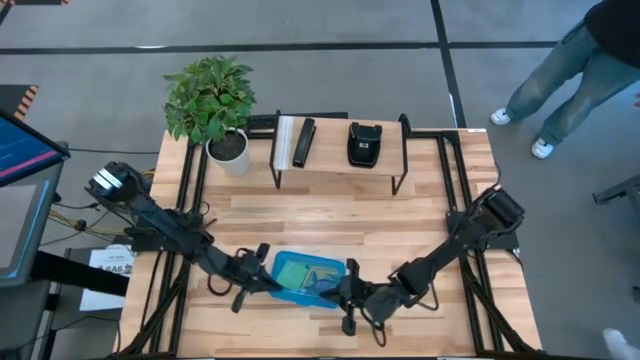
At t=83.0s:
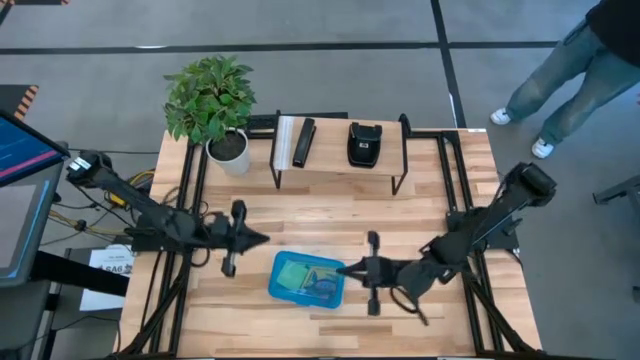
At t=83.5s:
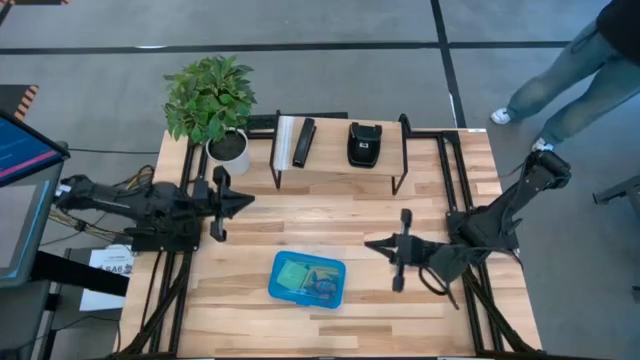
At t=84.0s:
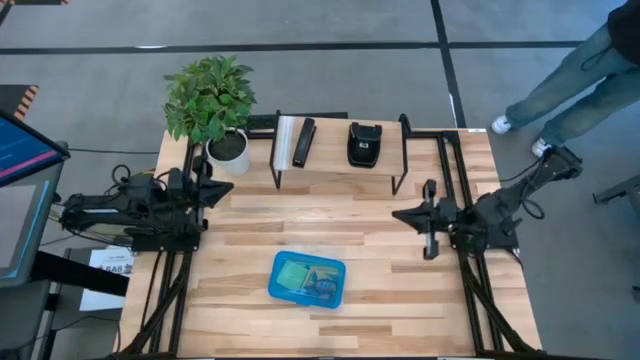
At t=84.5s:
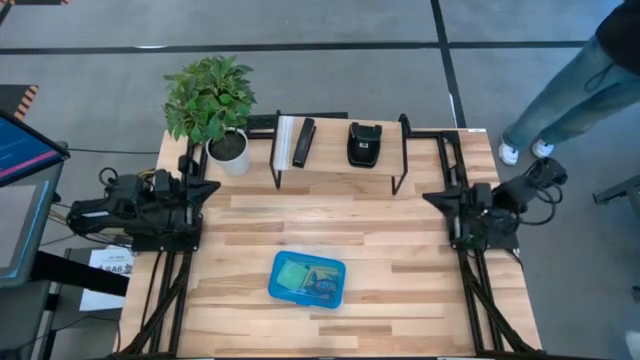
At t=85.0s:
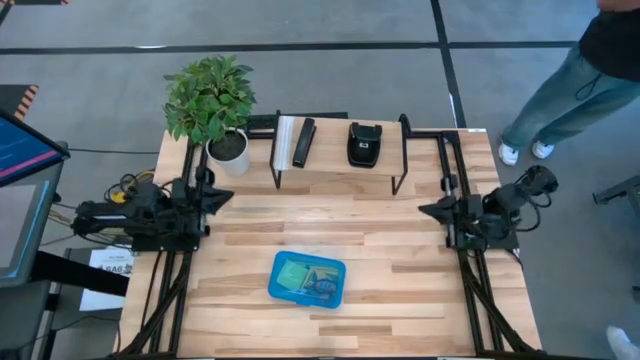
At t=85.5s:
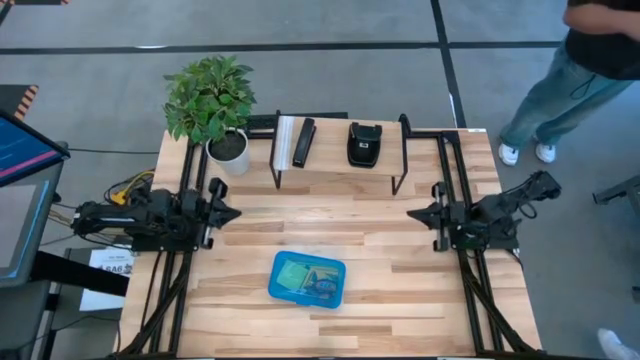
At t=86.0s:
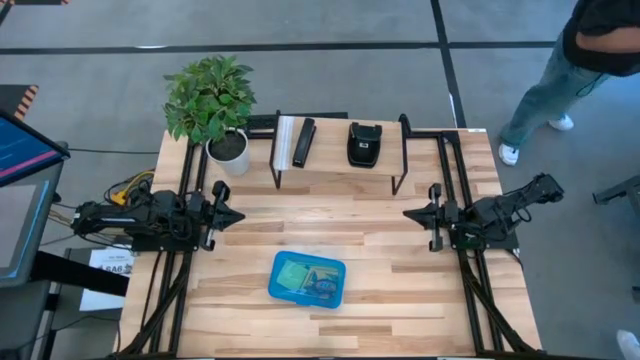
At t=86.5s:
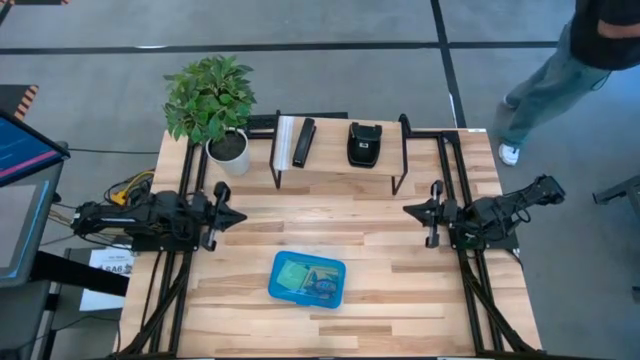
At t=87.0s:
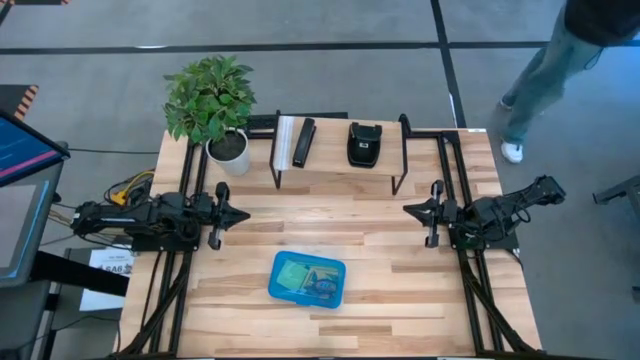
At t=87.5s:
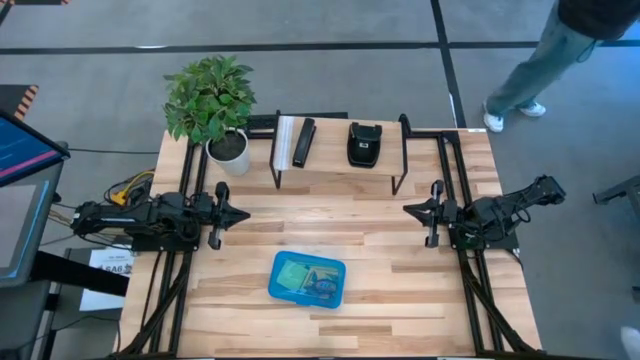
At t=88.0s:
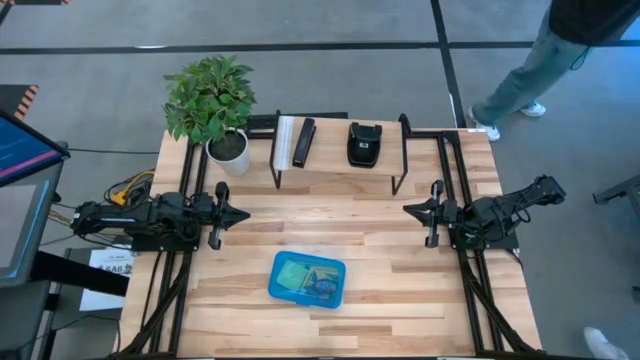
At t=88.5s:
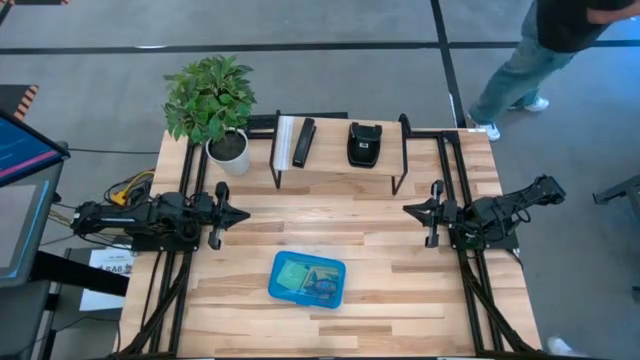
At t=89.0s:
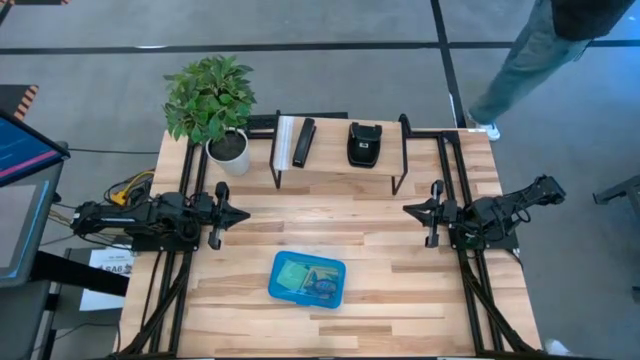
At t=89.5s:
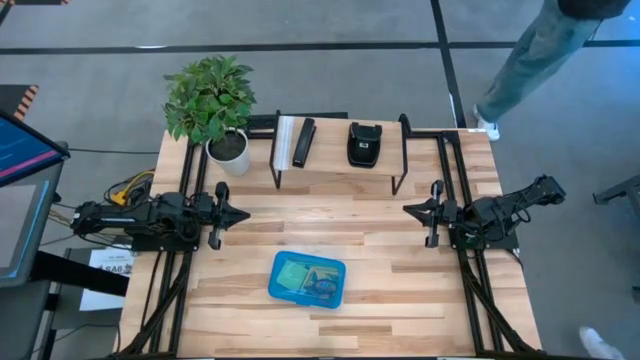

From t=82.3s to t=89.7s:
Task: Pack school essentials
Return to Home Position

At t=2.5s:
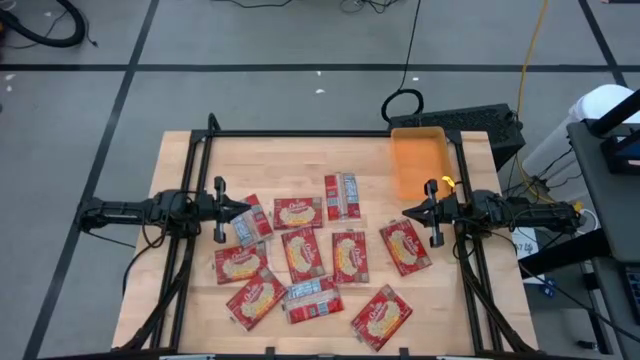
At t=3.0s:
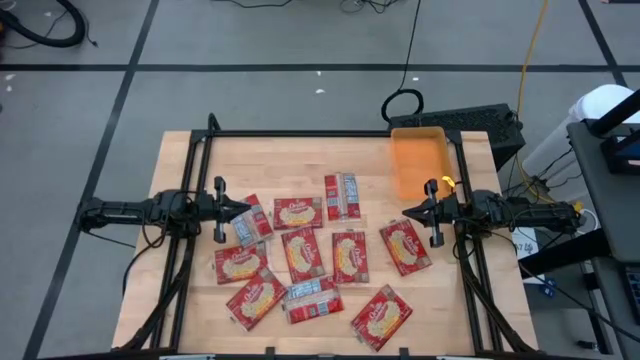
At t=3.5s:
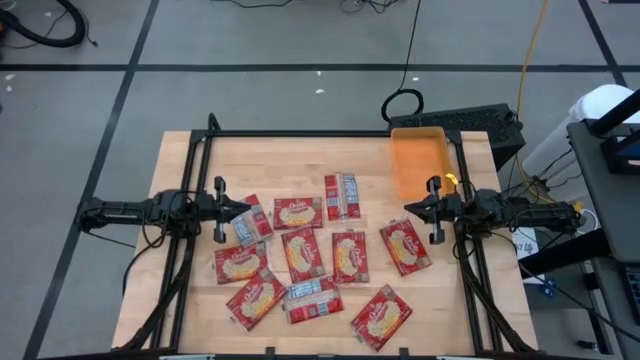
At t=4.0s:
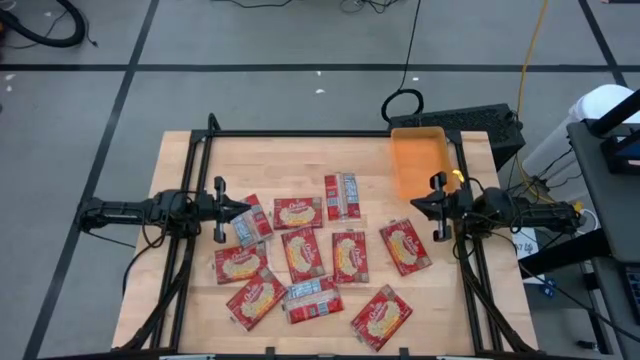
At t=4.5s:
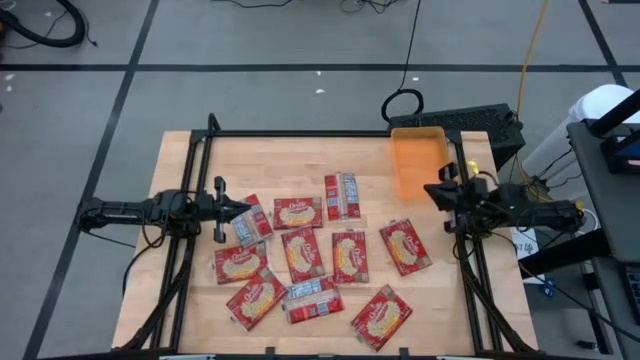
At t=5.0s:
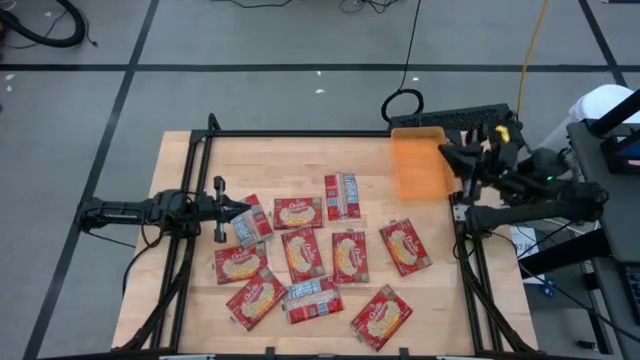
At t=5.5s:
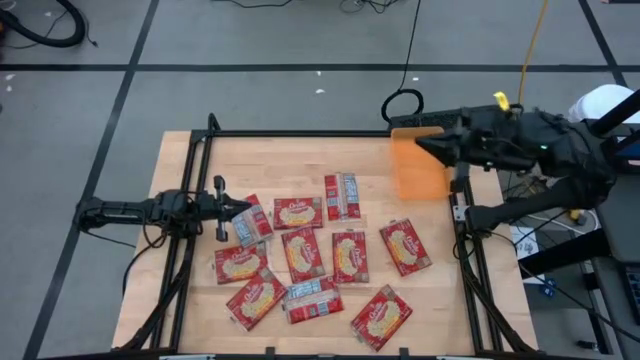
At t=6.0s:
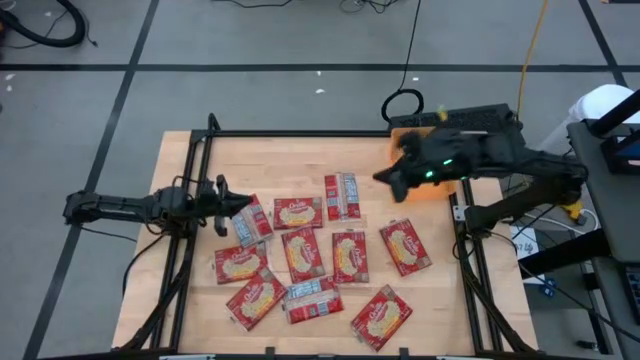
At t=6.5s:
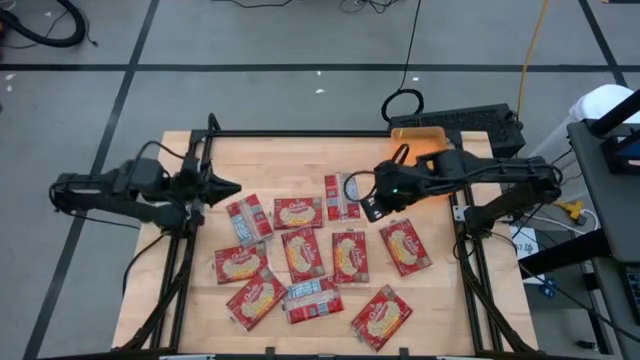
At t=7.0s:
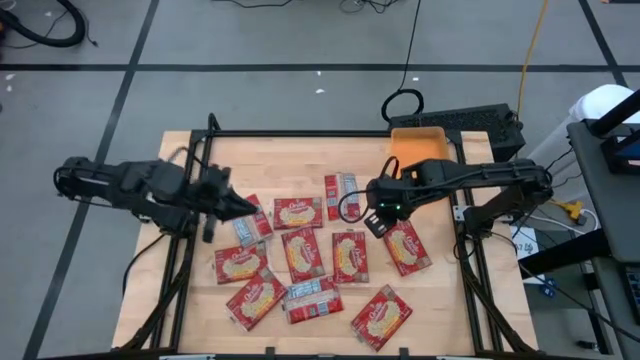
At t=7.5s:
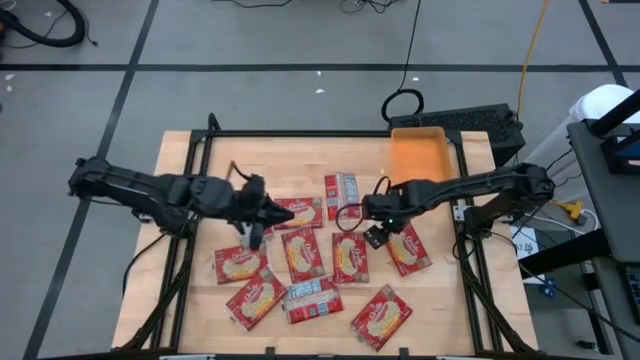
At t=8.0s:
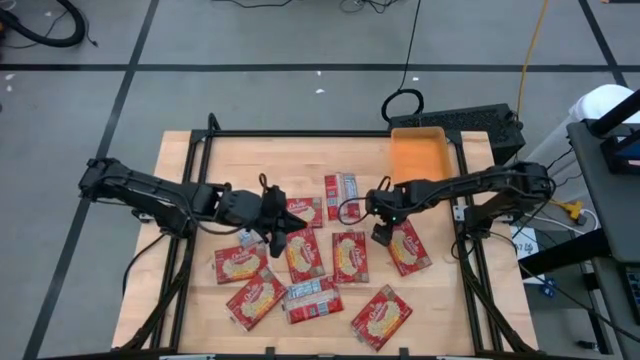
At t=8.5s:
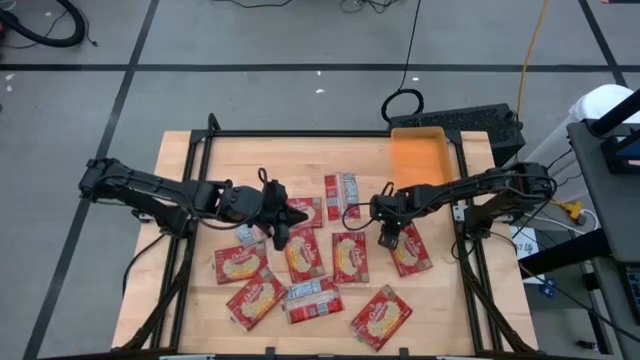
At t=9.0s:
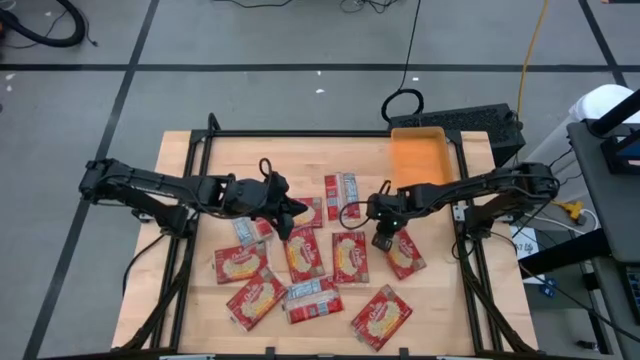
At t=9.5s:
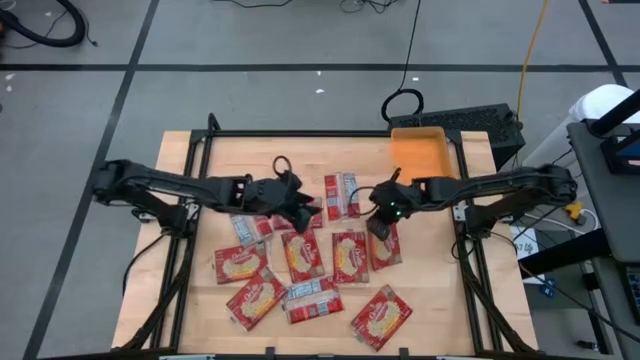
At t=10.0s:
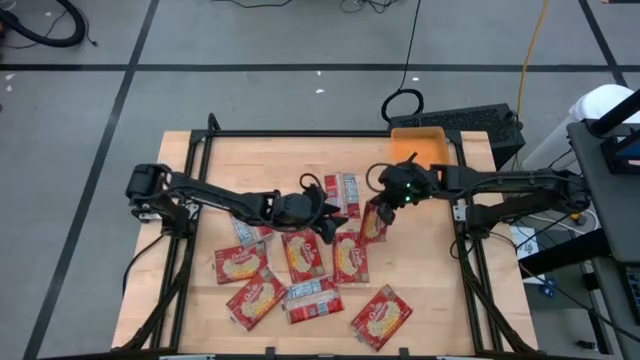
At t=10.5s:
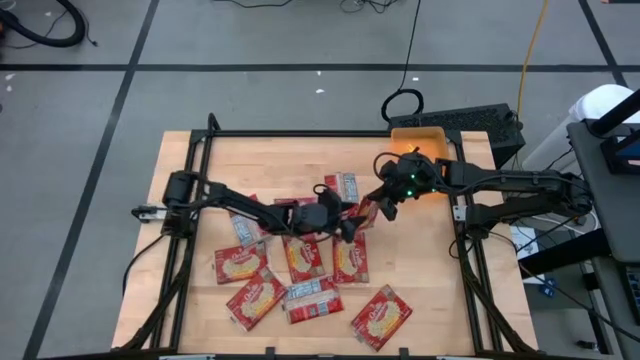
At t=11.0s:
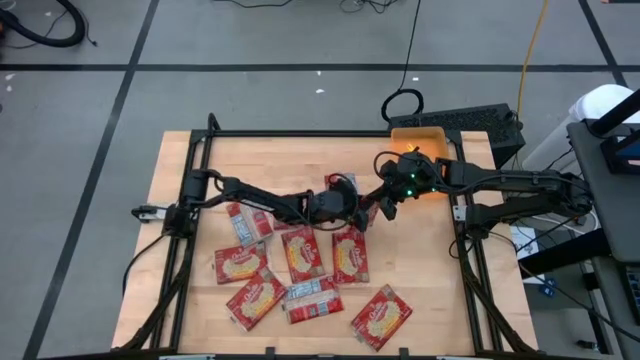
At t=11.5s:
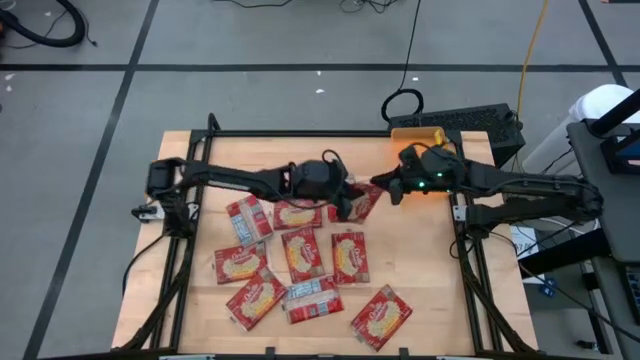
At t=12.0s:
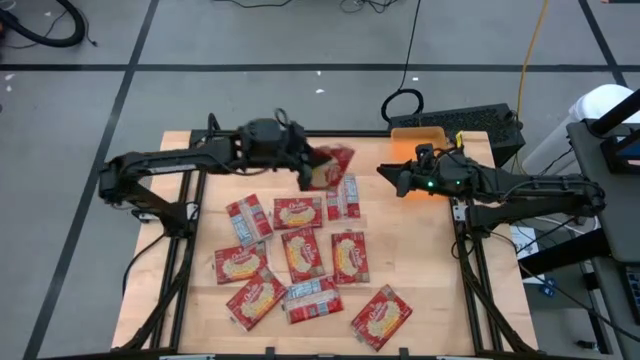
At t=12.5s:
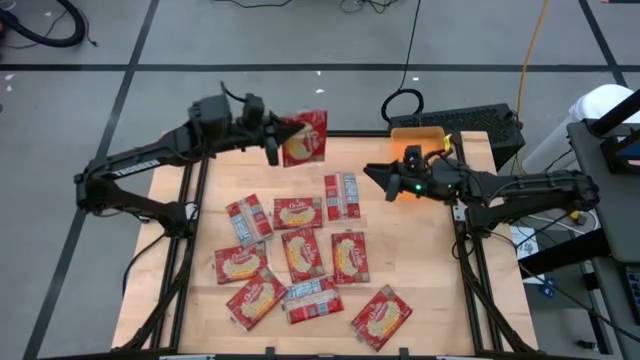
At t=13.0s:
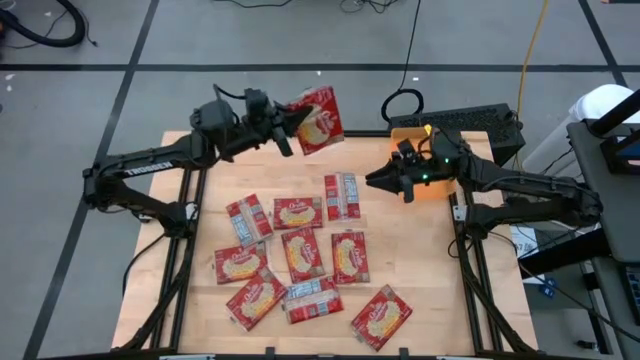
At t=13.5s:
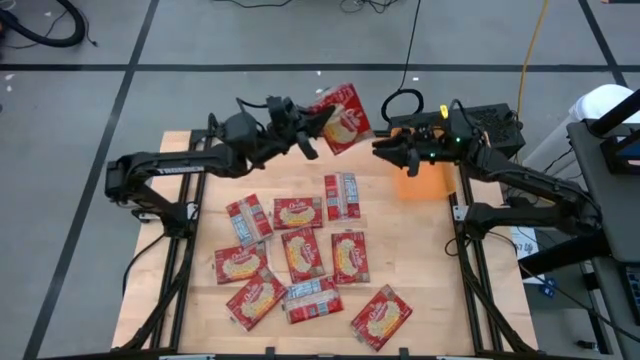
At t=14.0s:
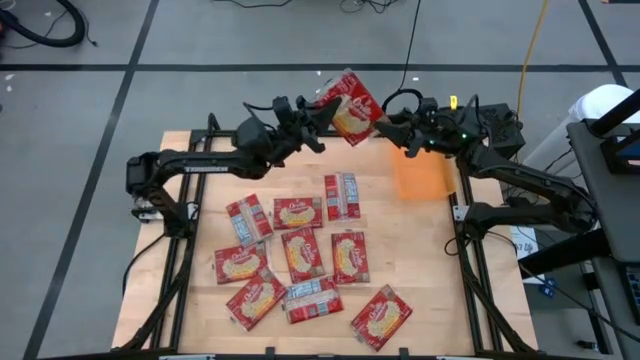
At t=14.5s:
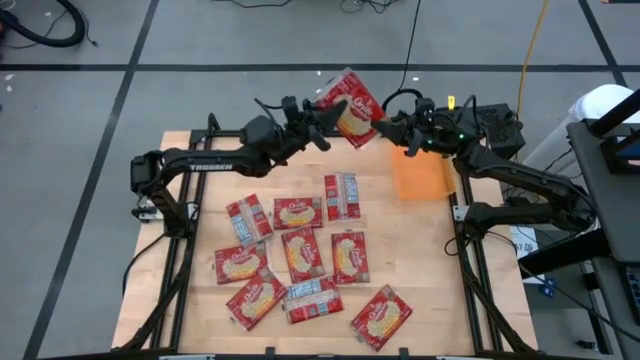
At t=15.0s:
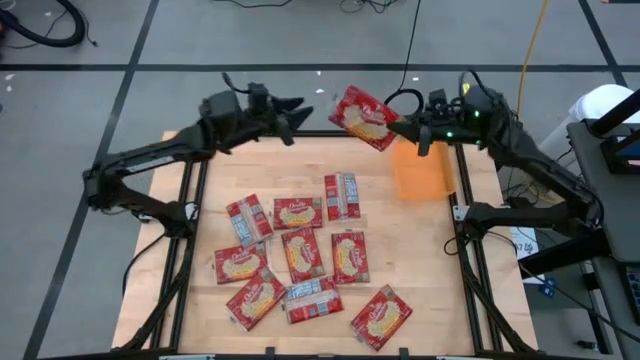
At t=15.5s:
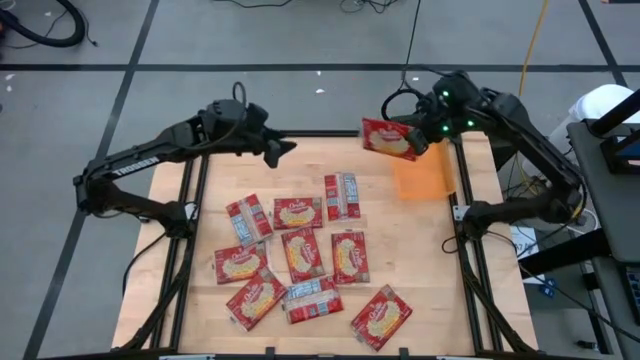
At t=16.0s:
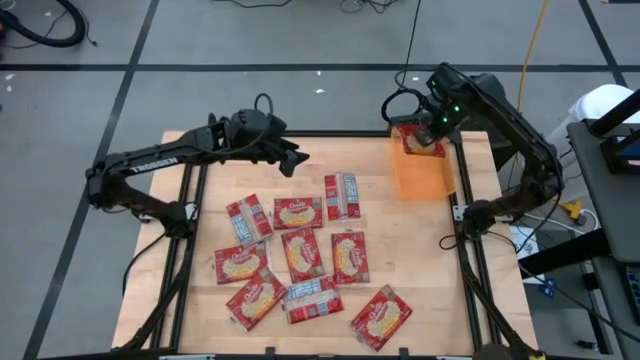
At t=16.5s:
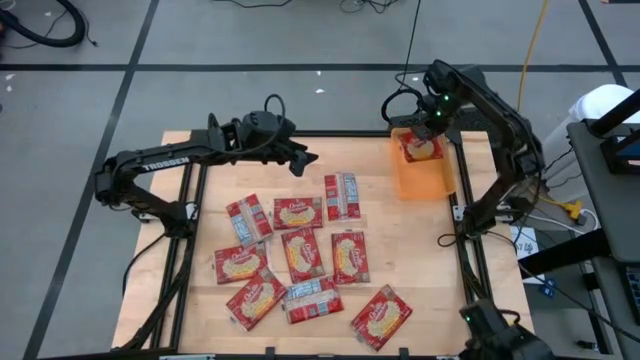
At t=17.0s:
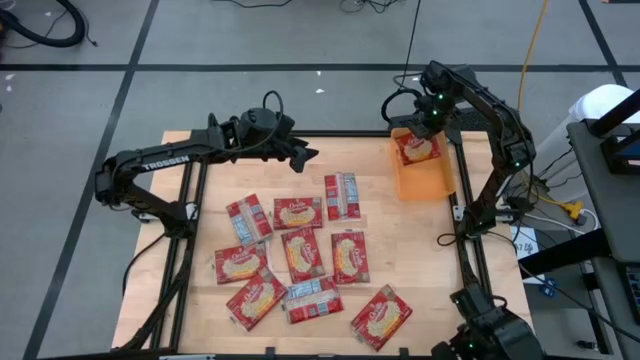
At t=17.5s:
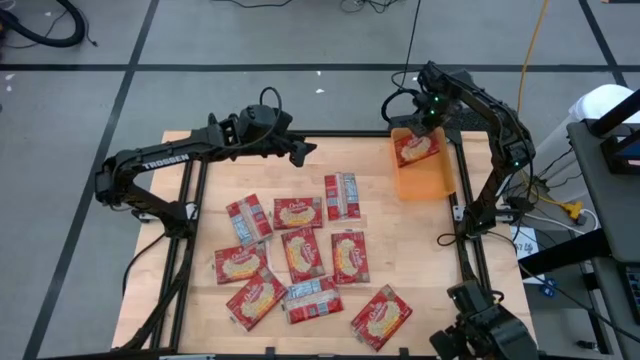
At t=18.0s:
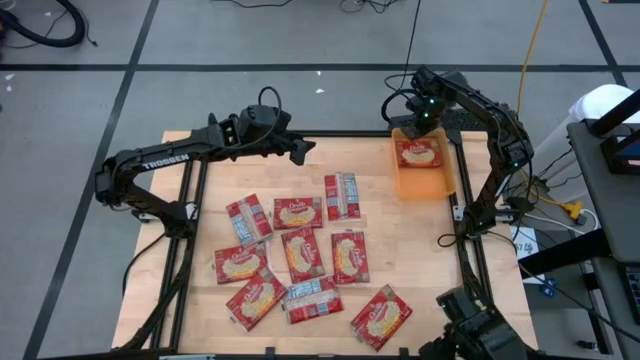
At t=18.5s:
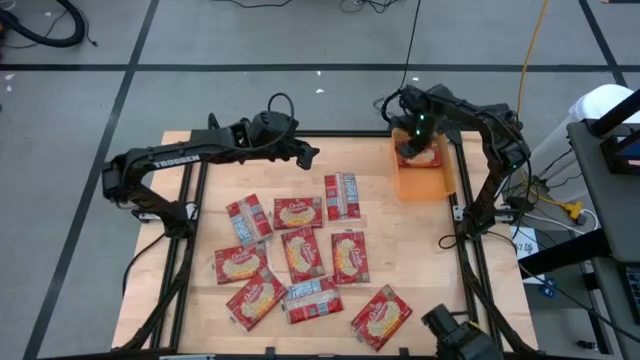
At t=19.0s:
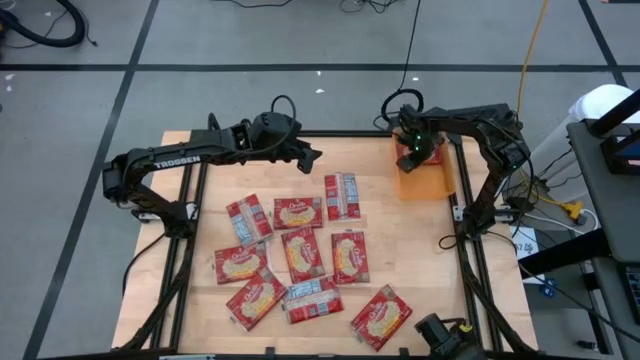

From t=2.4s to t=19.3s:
Task: Sort popcorn bags into baskets
Put the red popcorn bag into the orange bin
